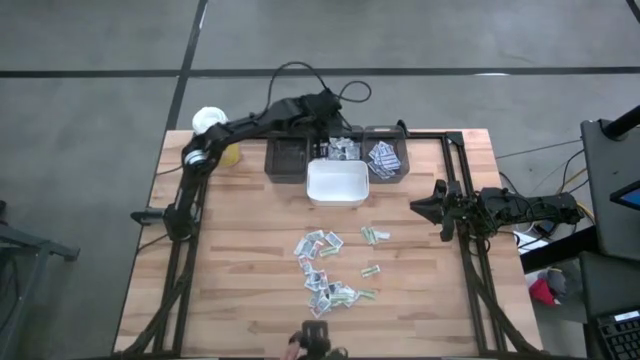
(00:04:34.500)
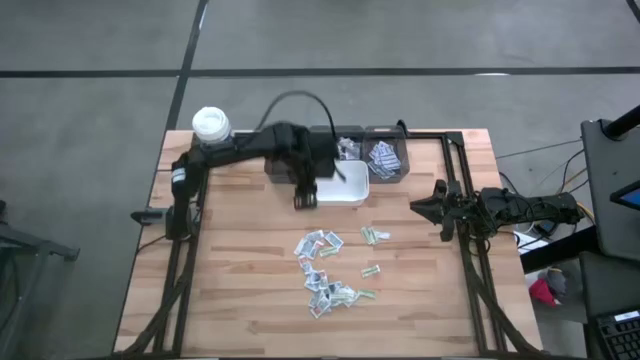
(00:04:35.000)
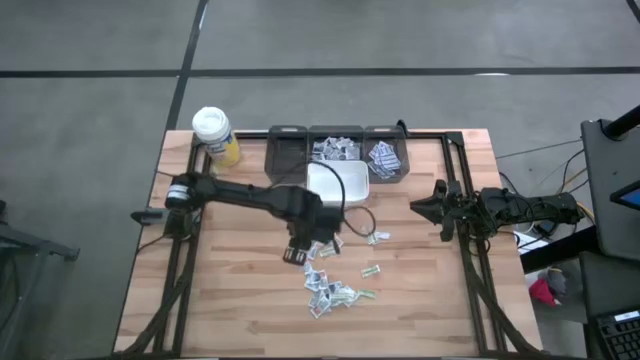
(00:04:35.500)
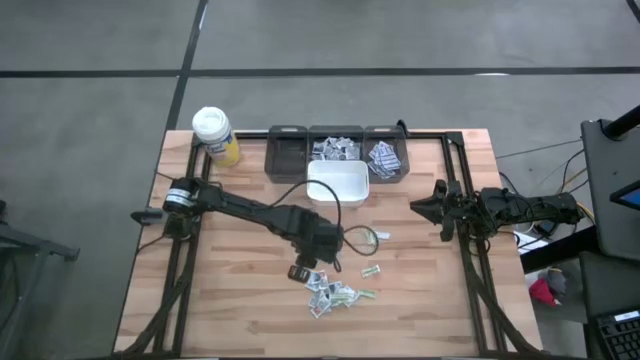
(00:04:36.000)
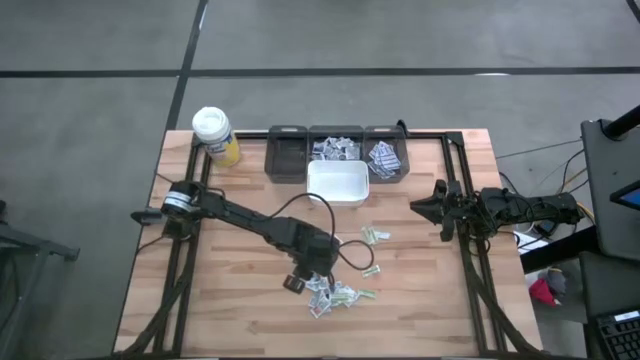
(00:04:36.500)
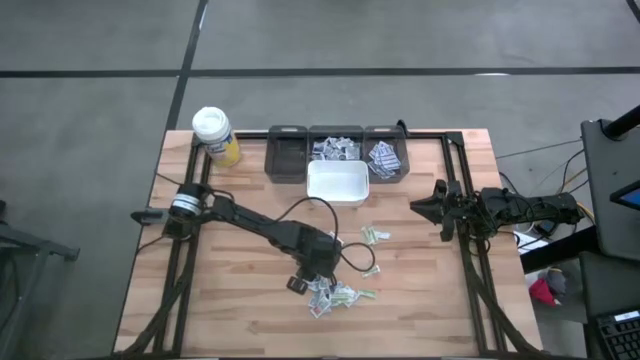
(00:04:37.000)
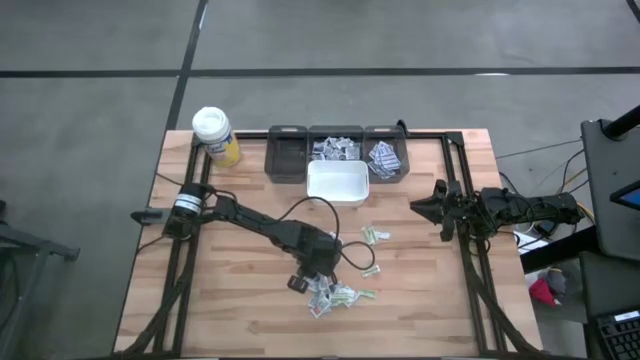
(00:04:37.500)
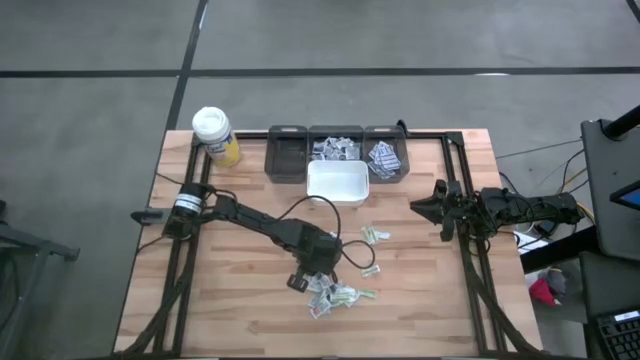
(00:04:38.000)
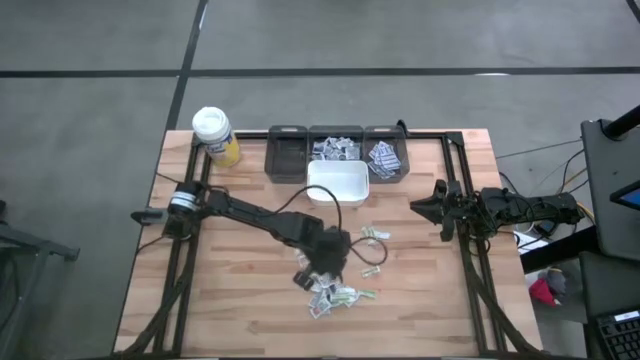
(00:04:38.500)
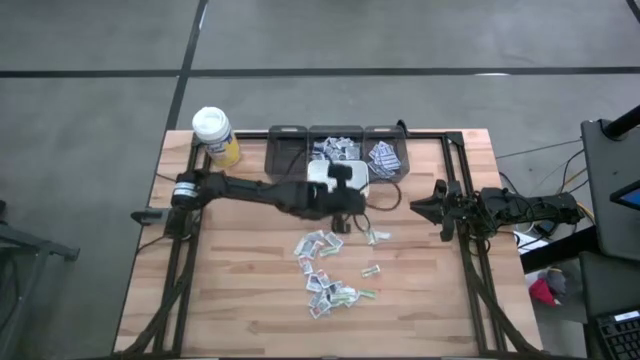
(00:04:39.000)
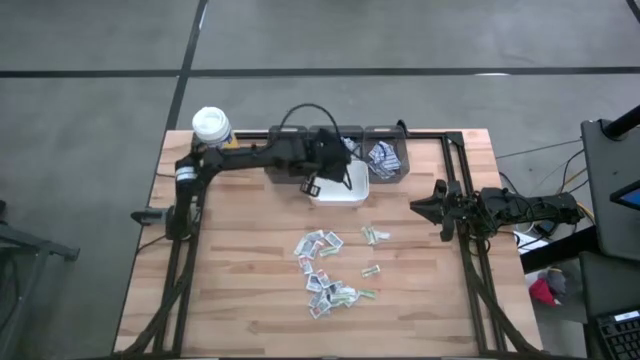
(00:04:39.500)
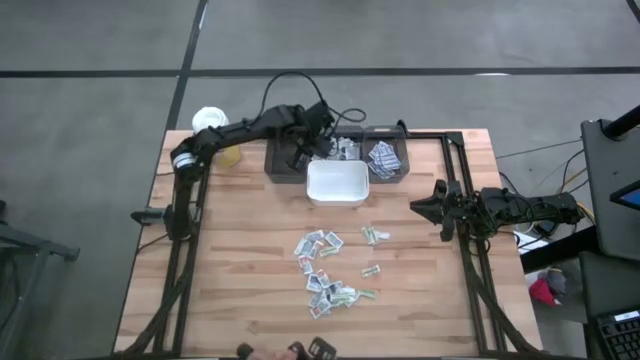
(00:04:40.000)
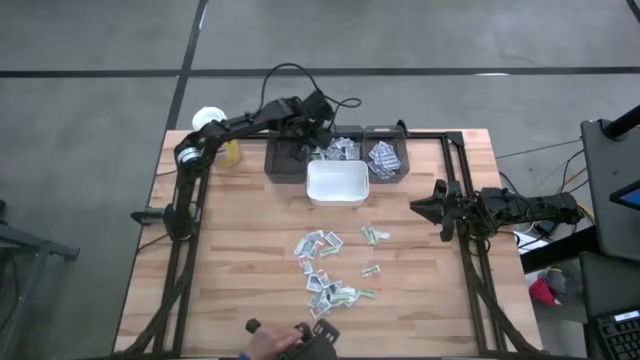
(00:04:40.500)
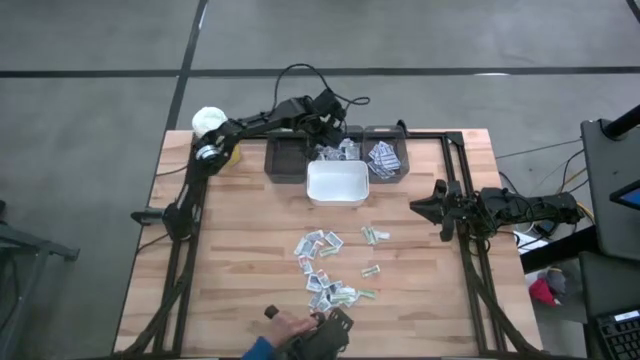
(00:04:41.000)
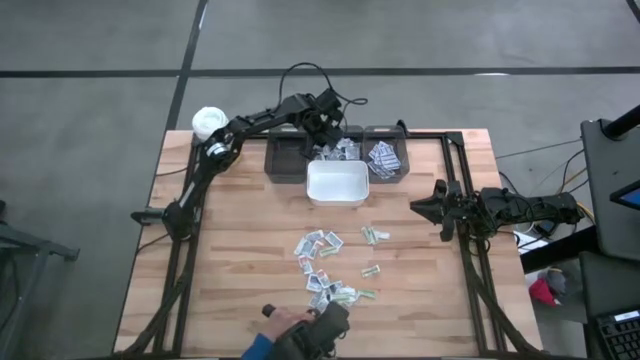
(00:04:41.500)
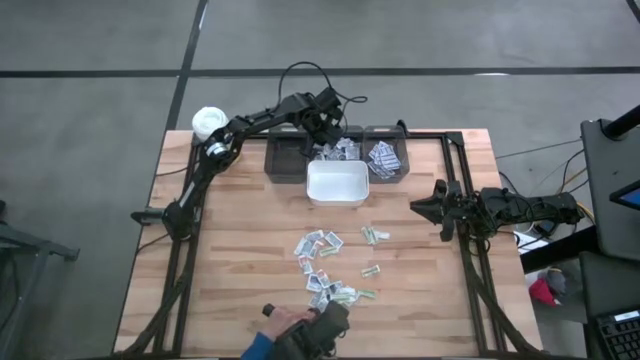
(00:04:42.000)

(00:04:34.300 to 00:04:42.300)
Task: Pick & Place First Aid Supplies
Put the alcohol pad into the middle black bin

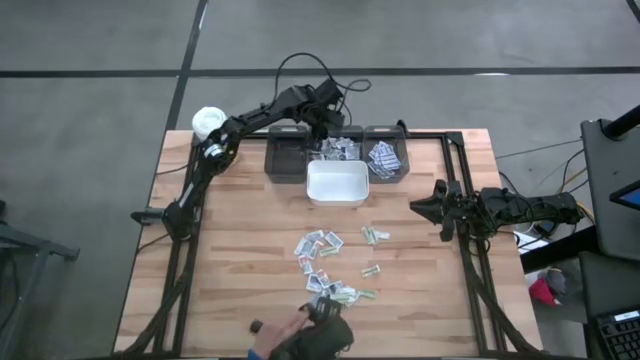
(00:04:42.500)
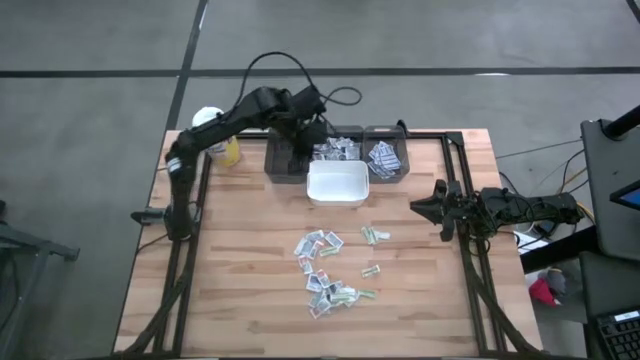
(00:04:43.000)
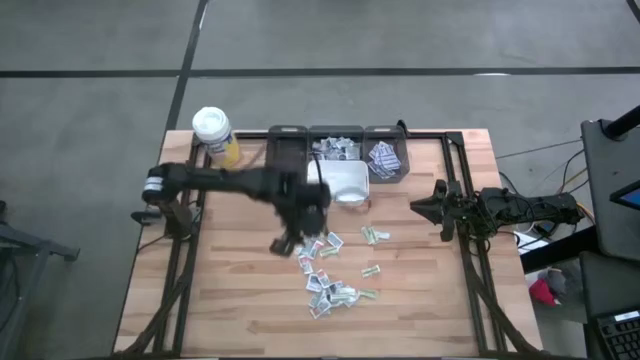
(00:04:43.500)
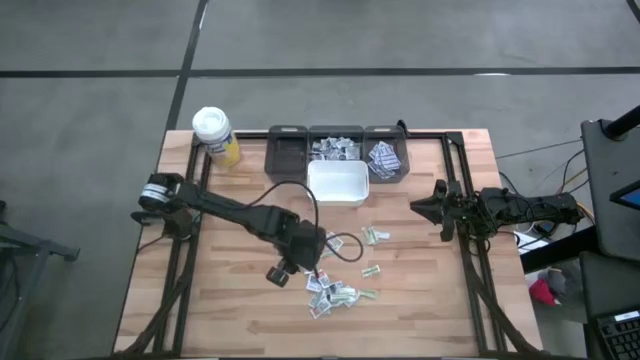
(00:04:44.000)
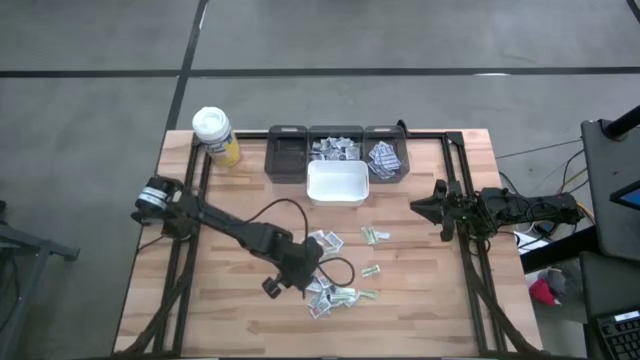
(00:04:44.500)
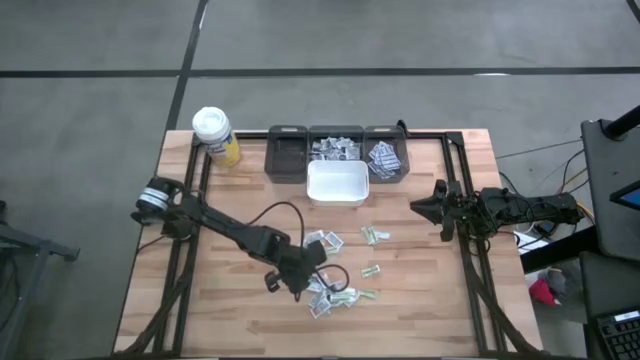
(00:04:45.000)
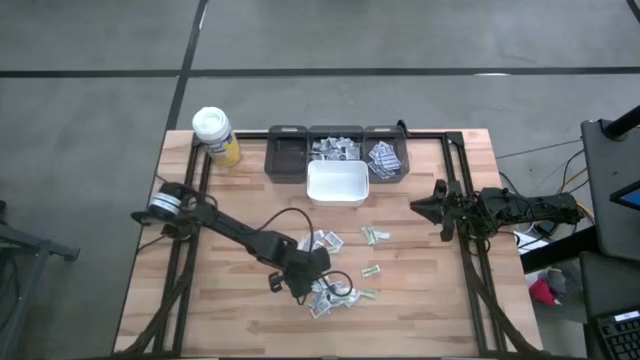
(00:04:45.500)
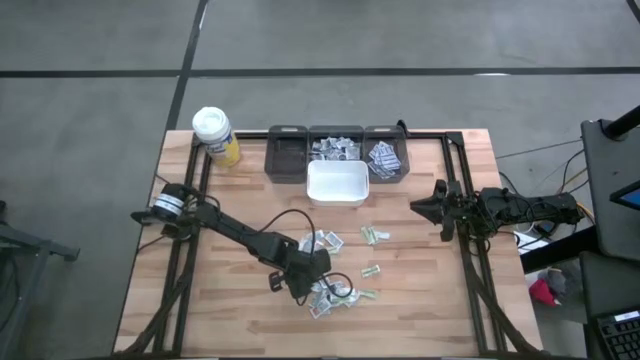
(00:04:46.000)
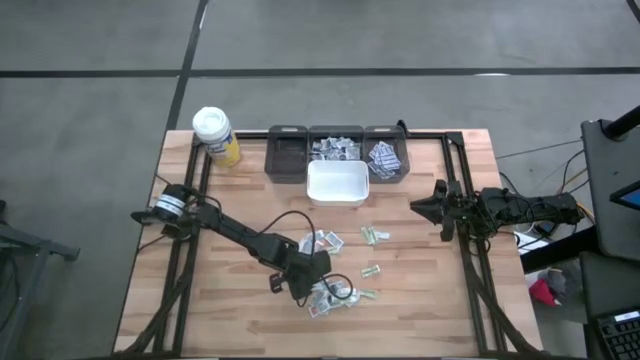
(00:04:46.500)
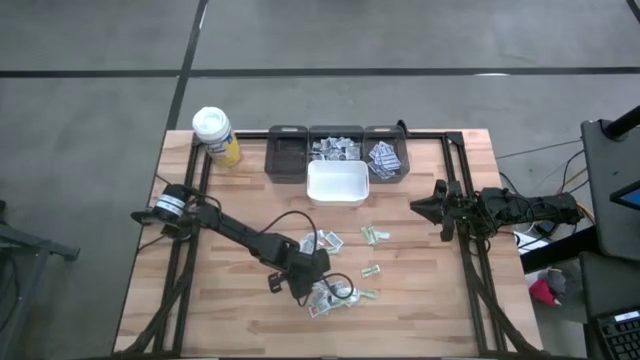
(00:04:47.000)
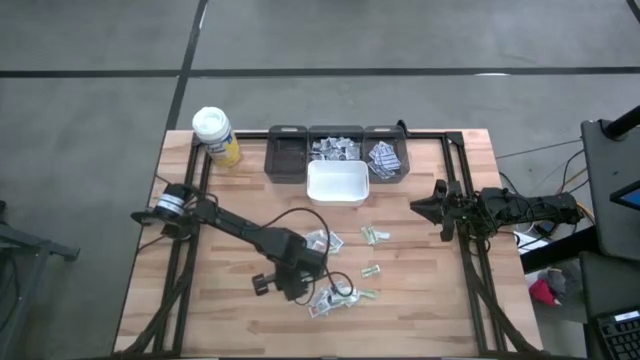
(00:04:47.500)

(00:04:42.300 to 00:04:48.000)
Put the alcohol pad into the middle black bin

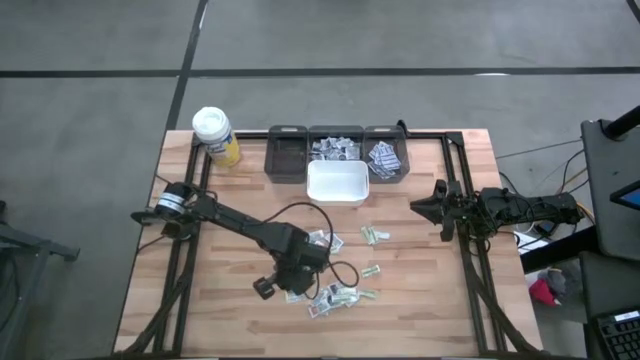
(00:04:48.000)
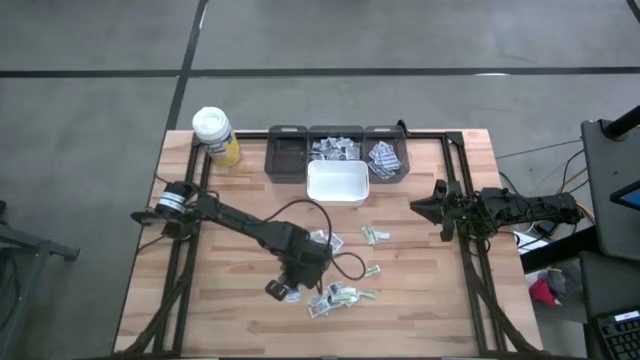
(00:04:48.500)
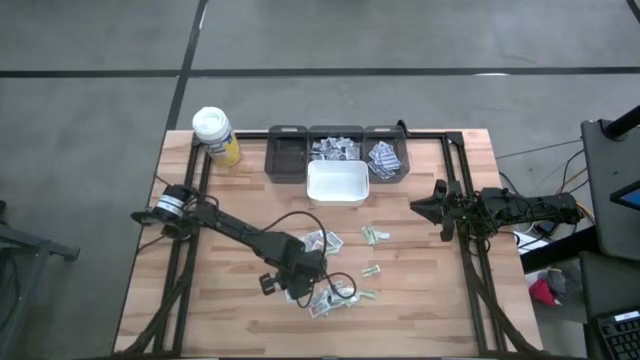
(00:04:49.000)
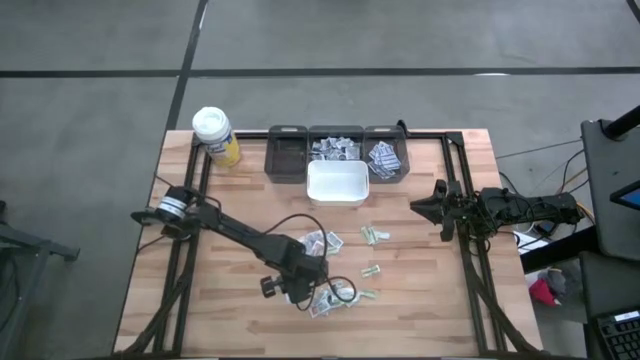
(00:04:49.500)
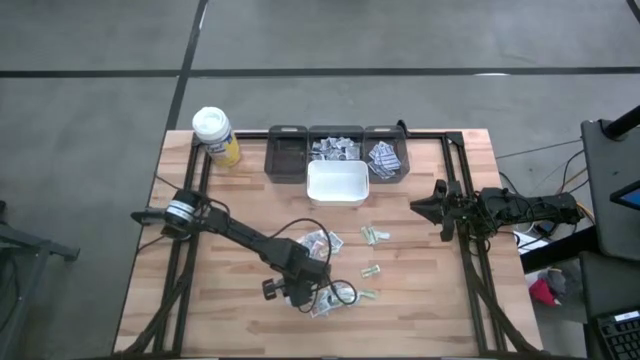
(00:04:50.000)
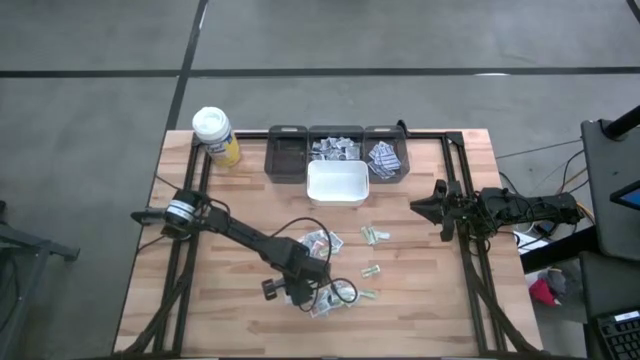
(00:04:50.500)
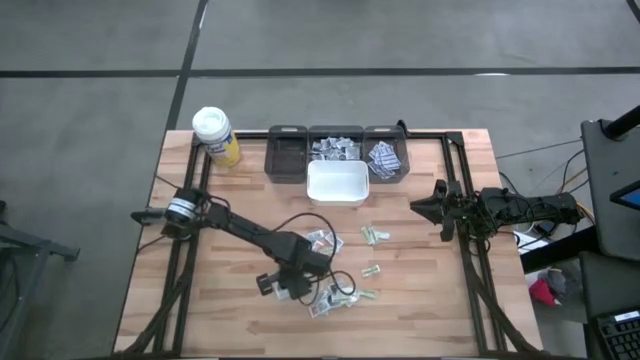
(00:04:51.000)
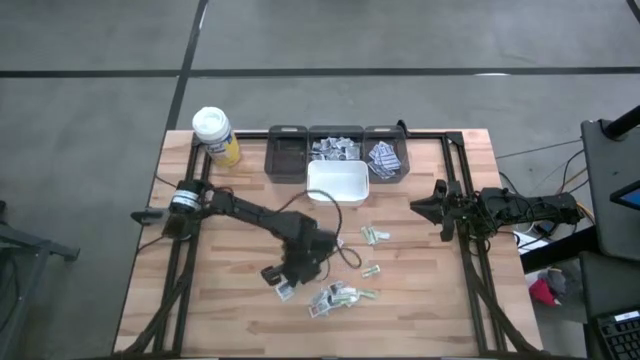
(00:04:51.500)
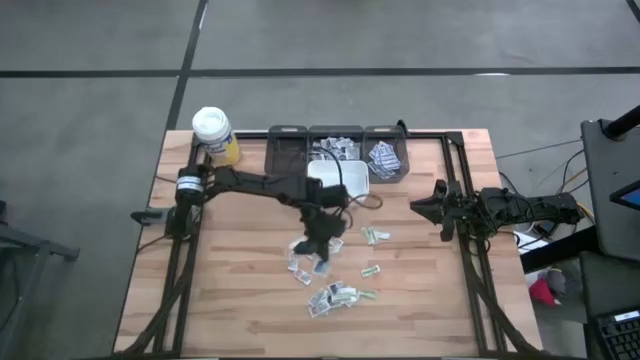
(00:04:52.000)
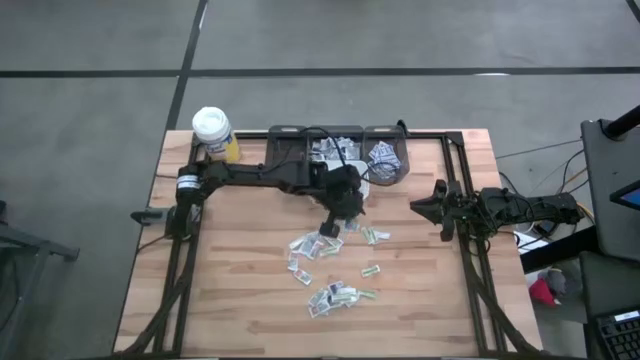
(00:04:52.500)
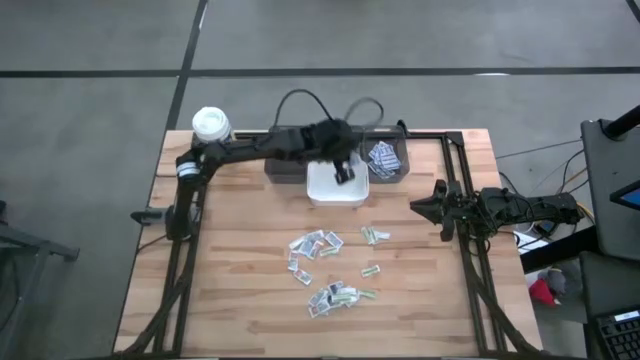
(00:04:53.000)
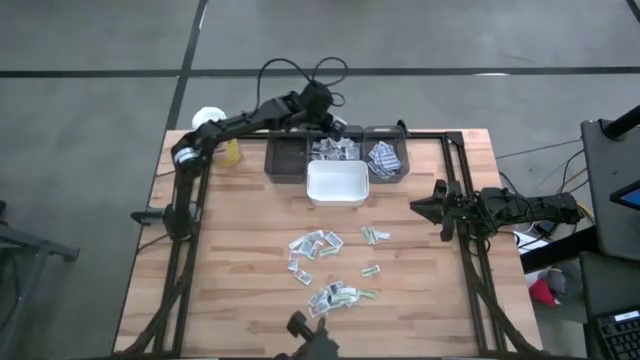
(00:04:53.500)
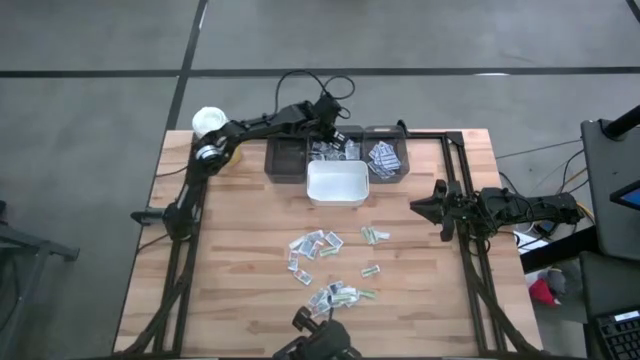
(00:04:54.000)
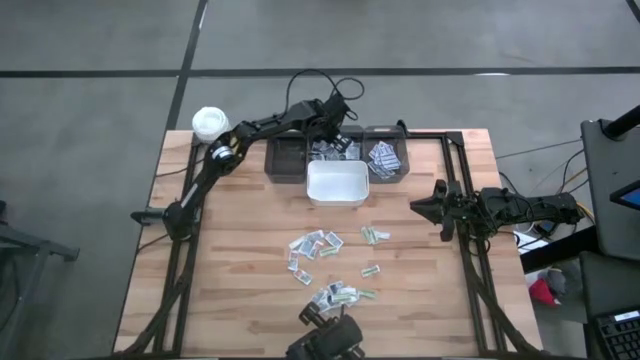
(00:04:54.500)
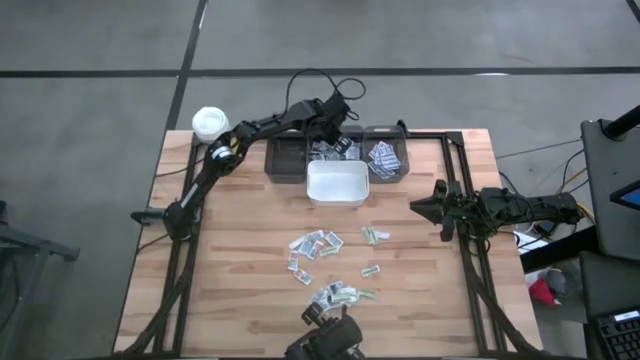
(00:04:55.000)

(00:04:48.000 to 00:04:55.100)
Put the alcohol pad into the middle black bin
